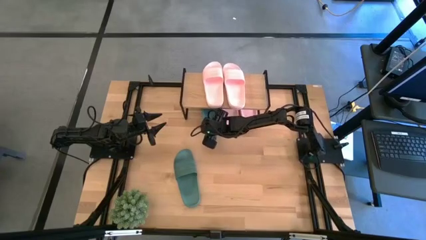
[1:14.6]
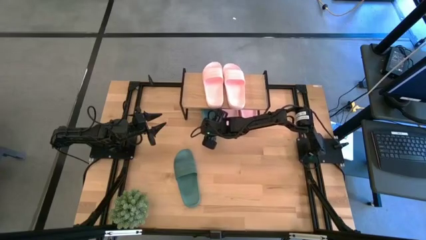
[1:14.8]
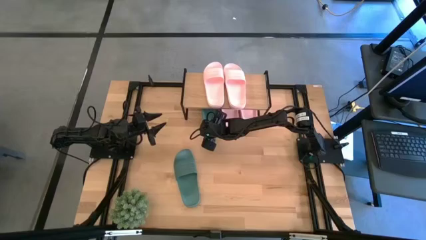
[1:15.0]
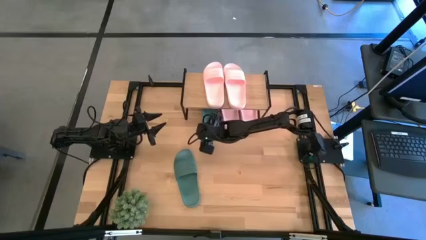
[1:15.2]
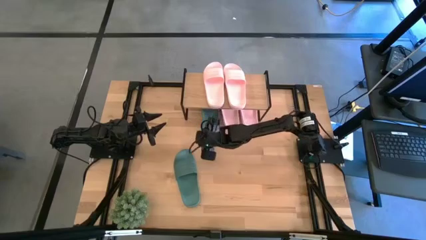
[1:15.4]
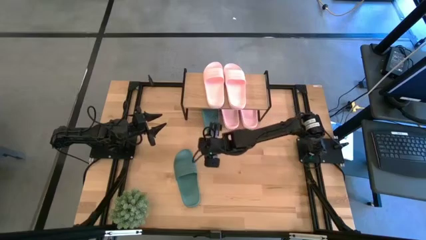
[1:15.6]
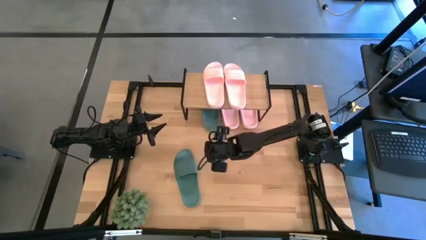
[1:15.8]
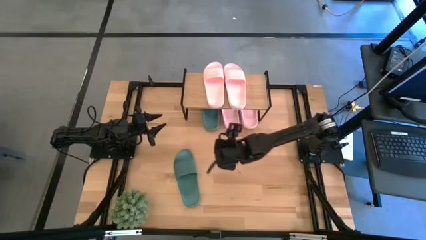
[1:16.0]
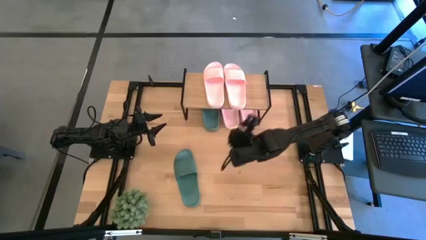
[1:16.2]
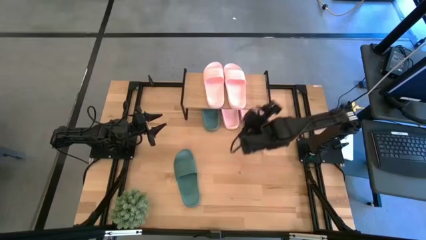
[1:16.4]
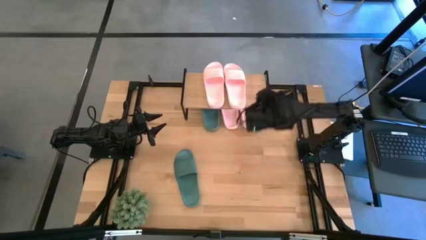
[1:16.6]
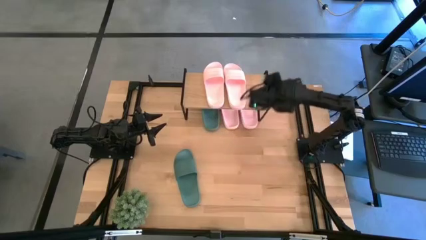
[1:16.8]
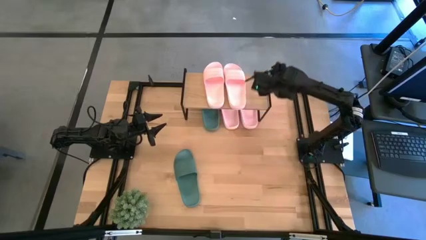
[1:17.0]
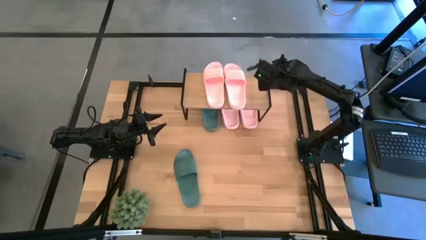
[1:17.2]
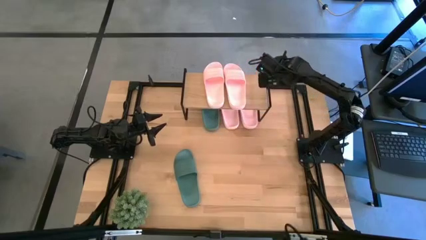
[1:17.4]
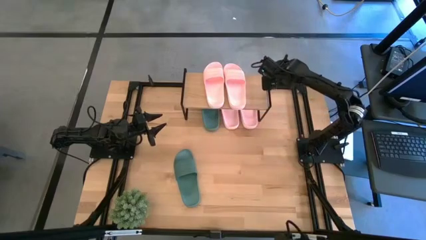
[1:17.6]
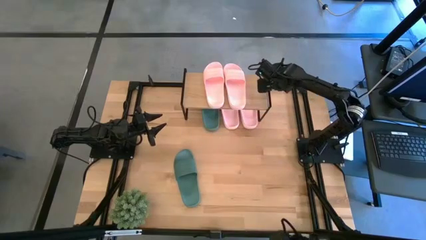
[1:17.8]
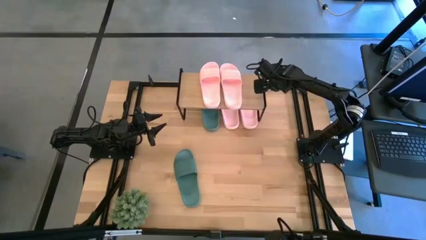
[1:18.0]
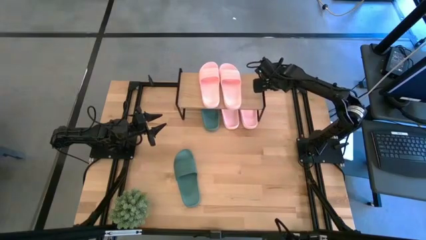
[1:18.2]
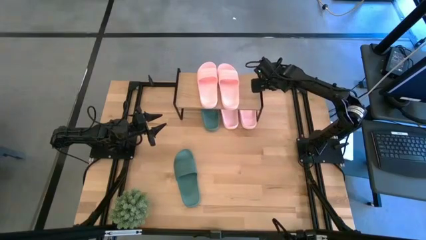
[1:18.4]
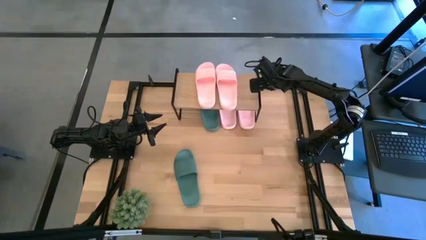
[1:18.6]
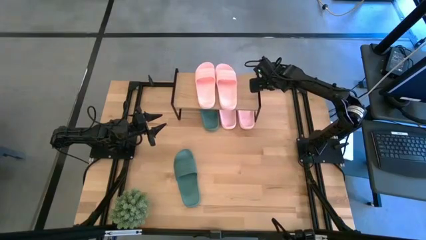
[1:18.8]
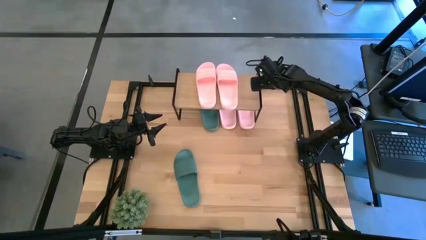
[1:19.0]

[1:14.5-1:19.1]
Task: Pick and place slides into the shelf
Adjust the shelf

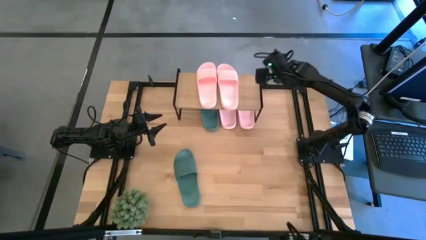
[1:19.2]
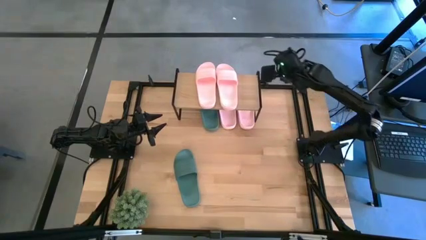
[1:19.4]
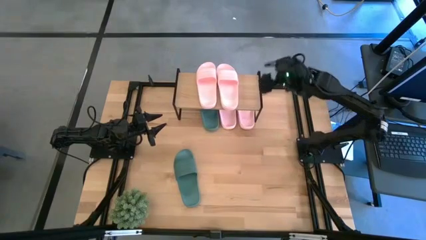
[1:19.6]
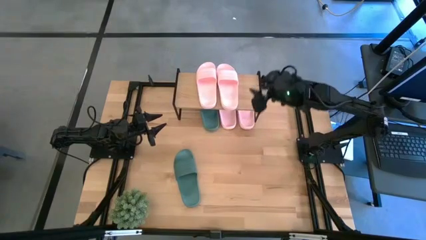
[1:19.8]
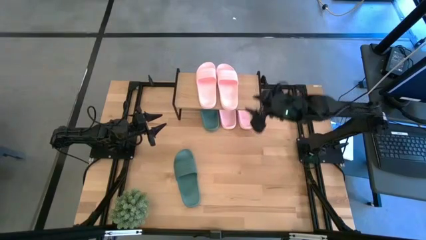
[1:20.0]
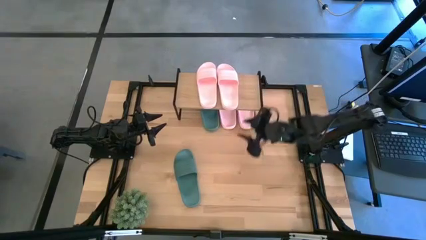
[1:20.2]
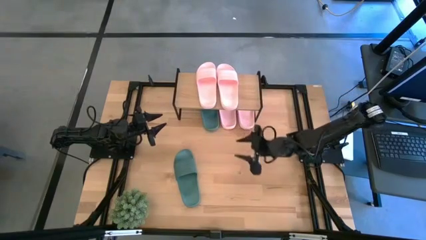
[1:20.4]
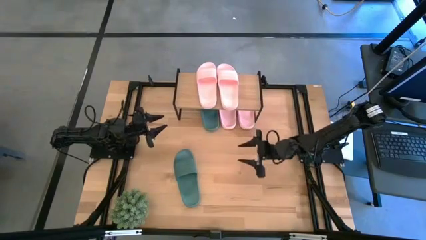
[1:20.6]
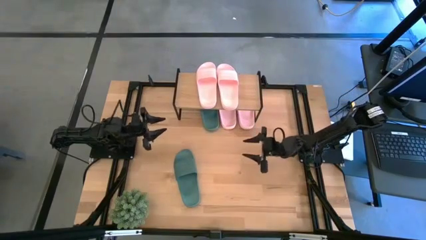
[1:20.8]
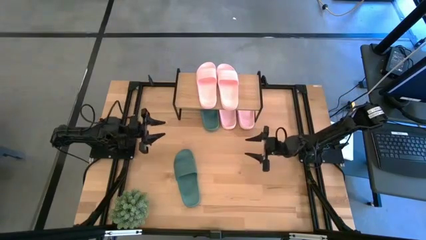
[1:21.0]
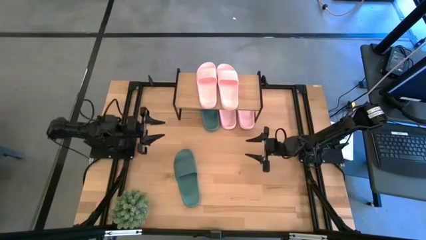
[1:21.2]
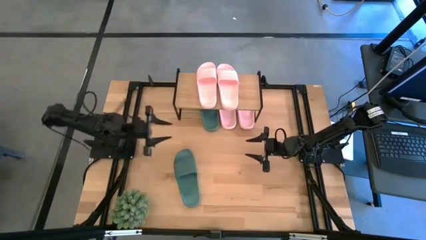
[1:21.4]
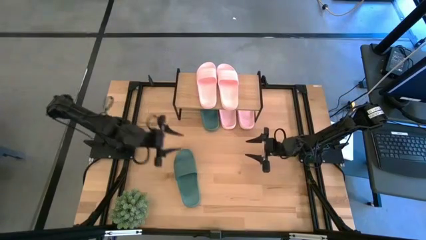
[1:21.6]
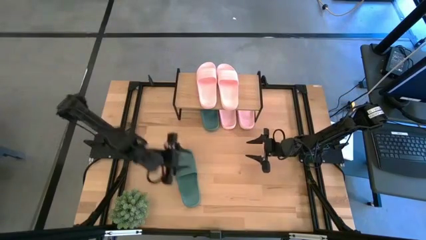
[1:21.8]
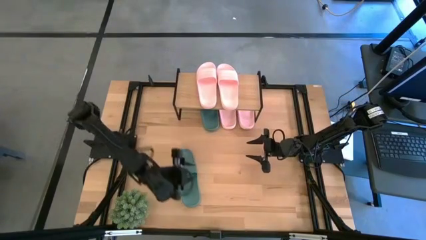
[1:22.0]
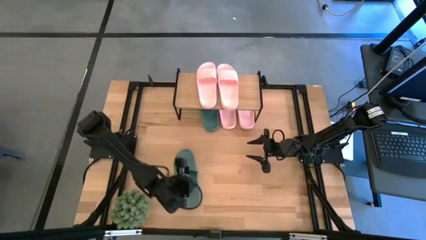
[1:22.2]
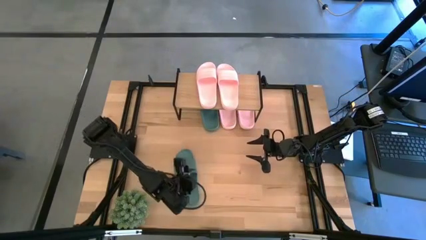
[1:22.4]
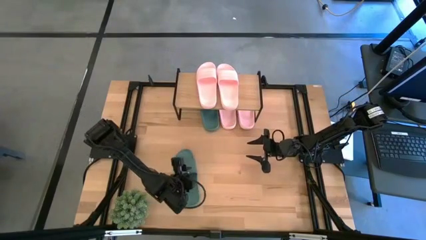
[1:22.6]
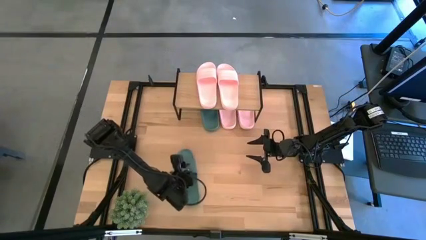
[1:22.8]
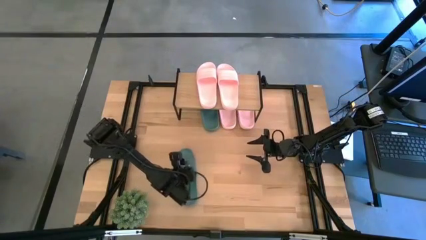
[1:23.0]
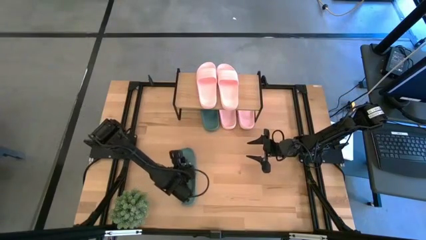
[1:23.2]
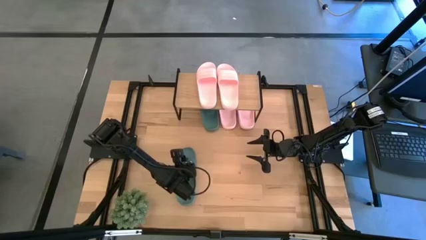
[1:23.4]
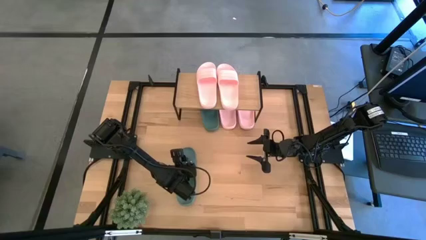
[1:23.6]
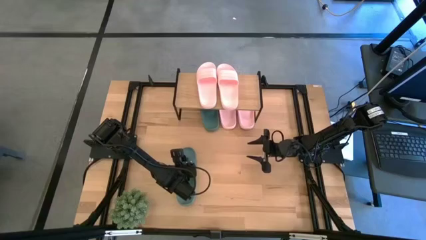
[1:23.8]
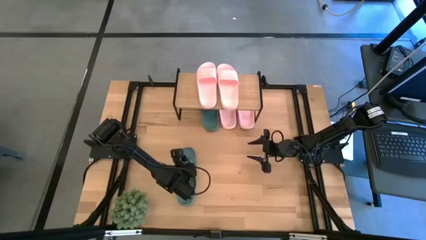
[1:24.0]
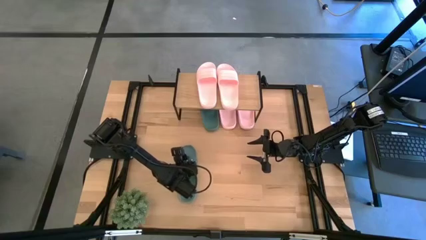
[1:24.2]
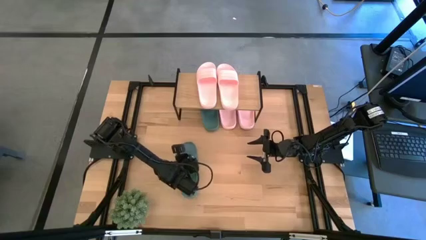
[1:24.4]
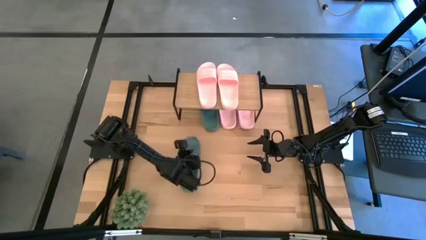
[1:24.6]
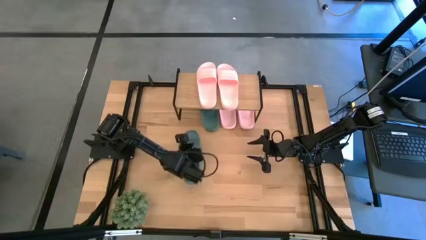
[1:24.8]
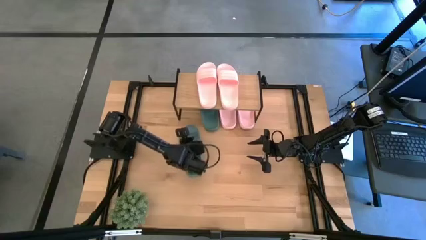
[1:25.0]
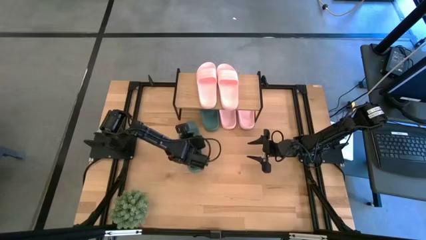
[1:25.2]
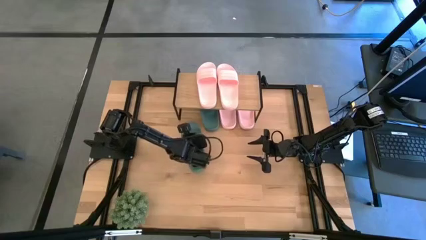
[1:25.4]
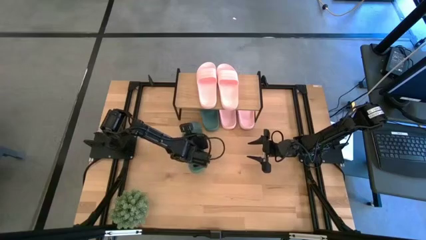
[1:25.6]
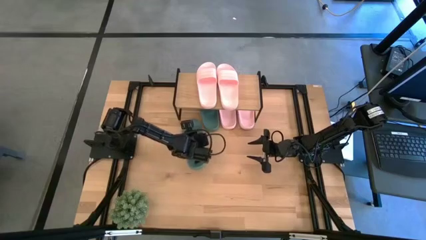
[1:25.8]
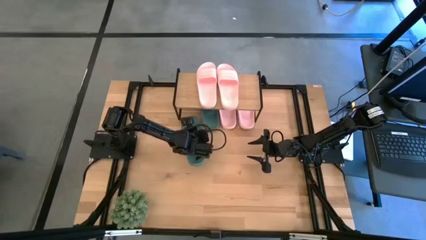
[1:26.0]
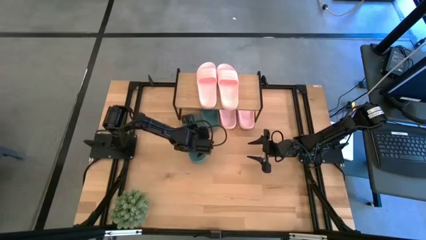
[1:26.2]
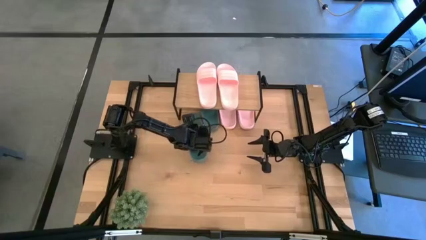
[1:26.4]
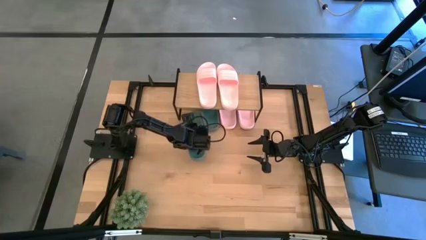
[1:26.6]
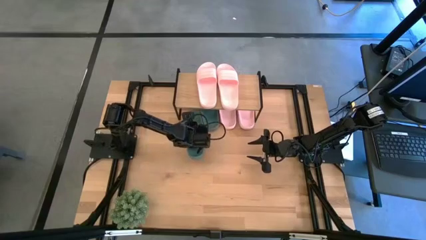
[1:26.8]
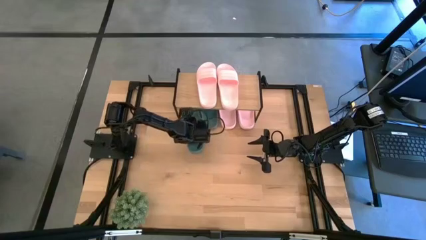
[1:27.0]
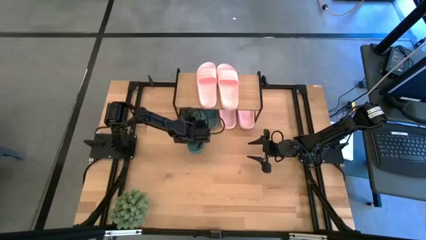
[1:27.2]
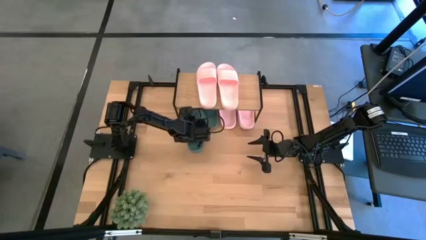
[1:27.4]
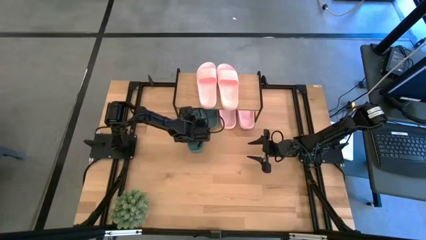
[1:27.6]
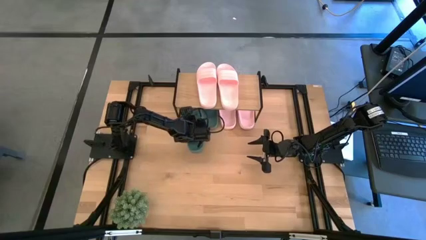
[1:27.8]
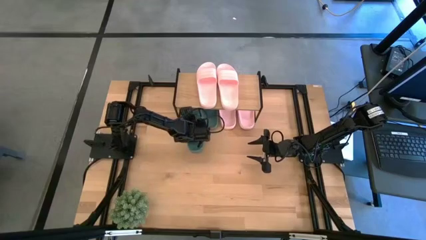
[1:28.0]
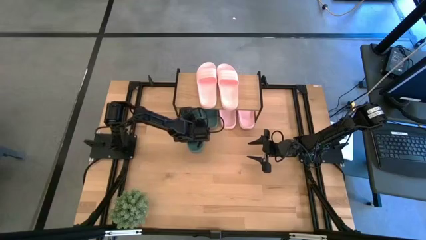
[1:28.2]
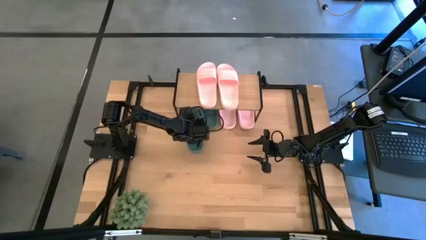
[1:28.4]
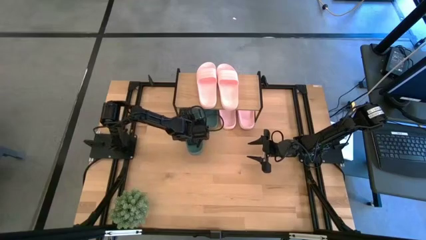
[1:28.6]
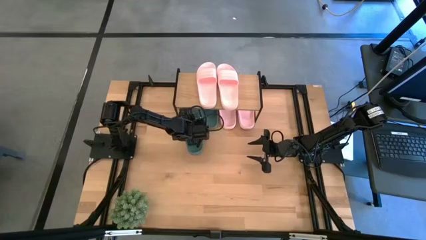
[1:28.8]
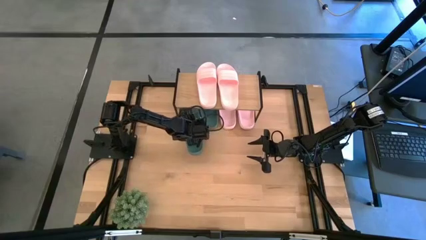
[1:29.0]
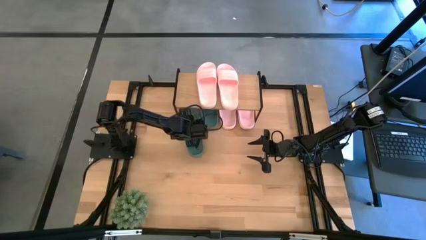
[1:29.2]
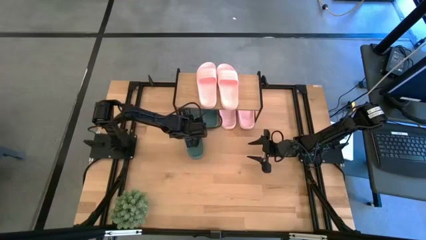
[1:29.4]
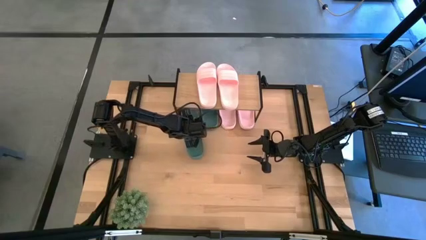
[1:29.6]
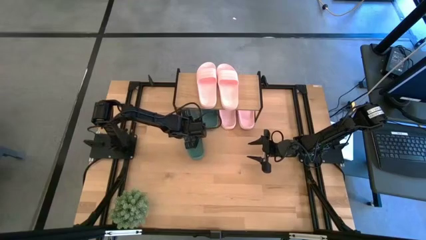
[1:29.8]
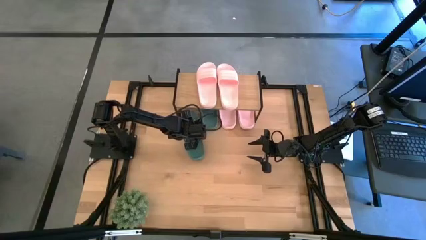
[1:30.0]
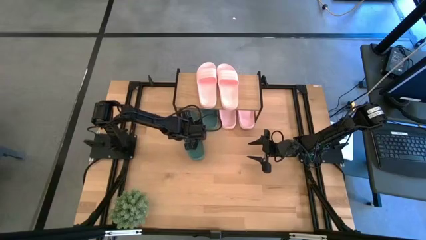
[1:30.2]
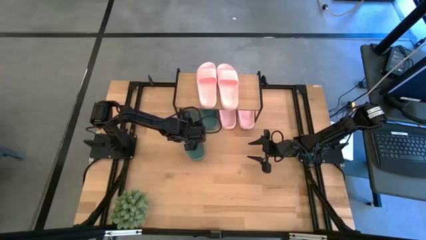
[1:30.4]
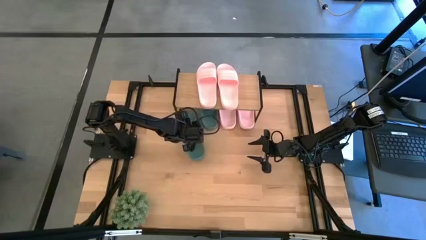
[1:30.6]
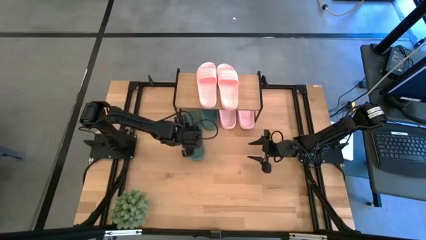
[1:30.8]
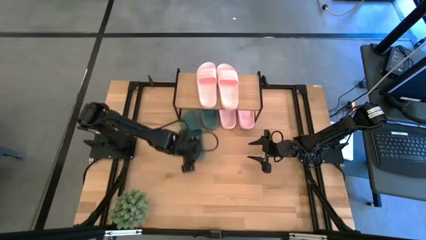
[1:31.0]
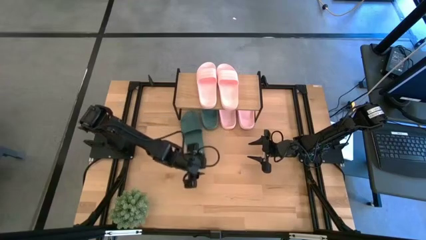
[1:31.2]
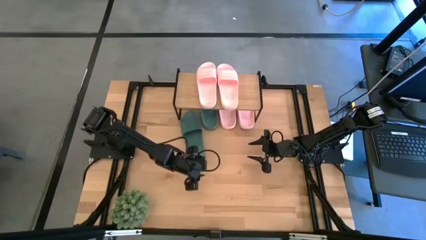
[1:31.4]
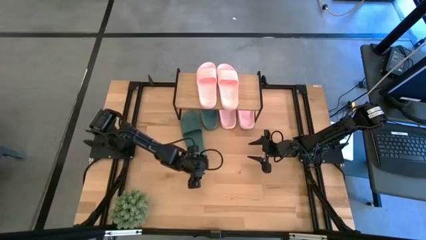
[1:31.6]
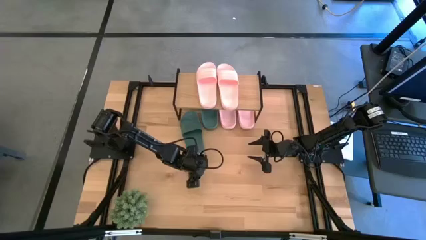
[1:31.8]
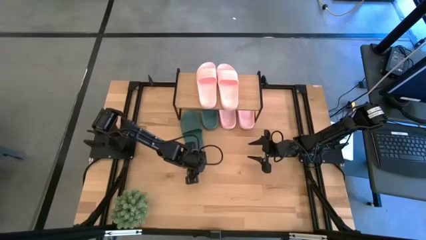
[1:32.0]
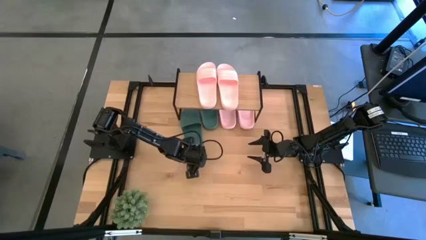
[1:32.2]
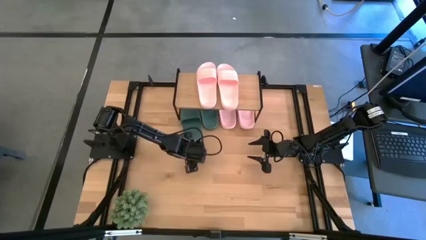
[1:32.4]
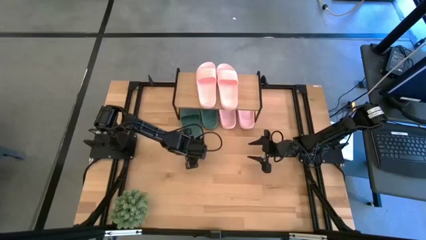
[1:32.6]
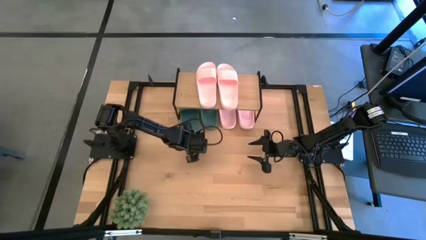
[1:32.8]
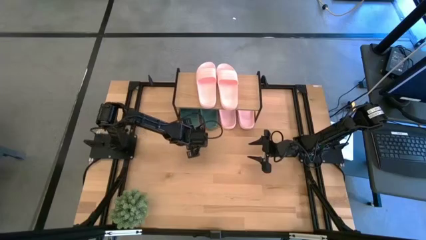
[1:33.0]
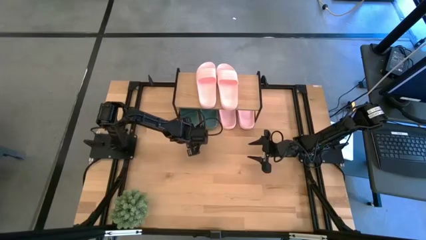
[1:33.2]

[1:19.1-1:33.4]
Put the green slide under the shelf
